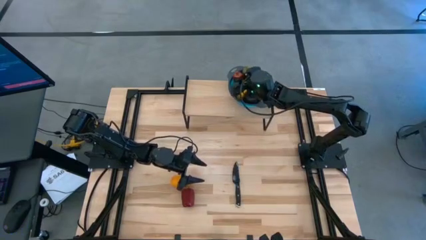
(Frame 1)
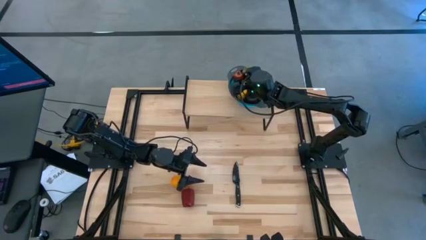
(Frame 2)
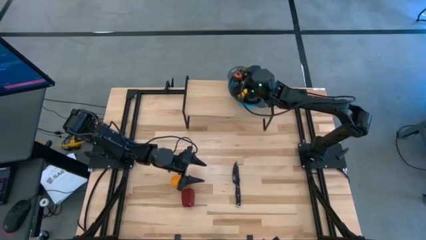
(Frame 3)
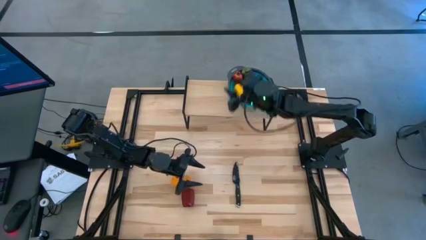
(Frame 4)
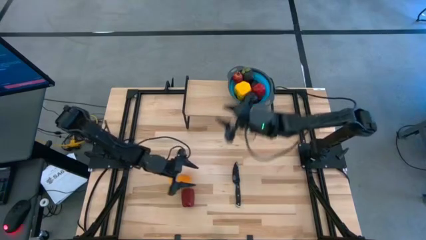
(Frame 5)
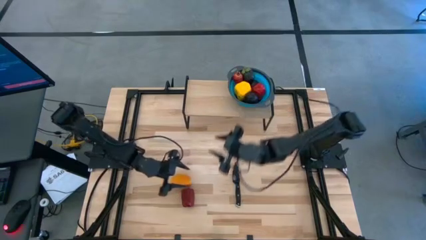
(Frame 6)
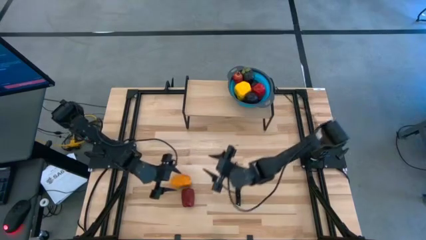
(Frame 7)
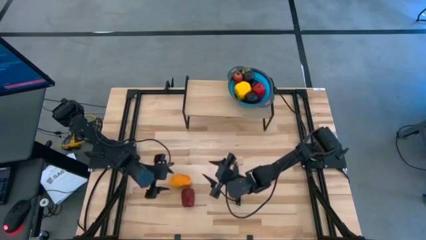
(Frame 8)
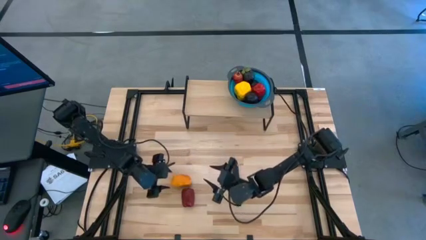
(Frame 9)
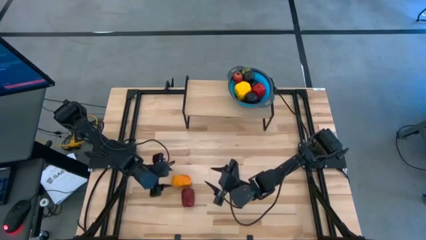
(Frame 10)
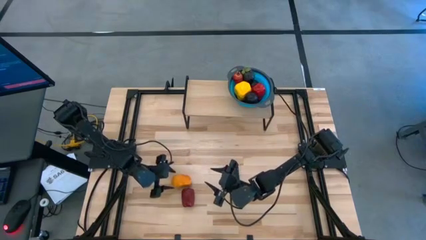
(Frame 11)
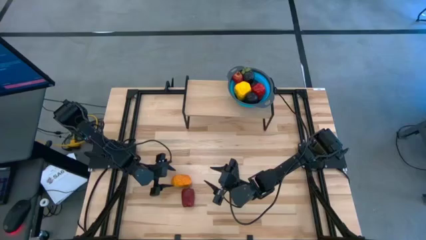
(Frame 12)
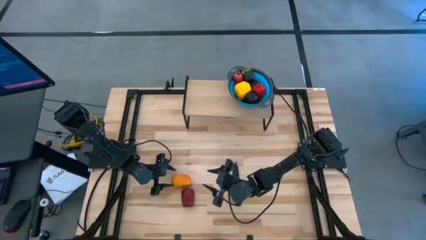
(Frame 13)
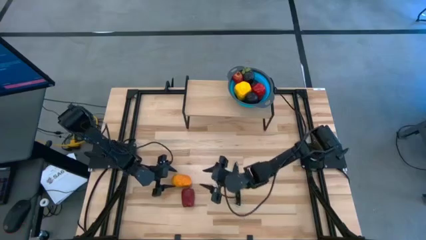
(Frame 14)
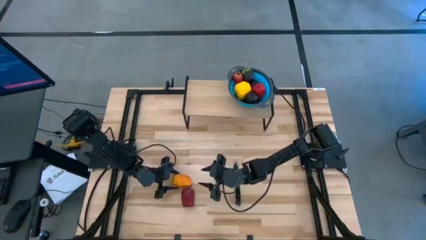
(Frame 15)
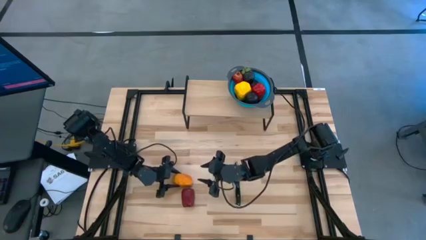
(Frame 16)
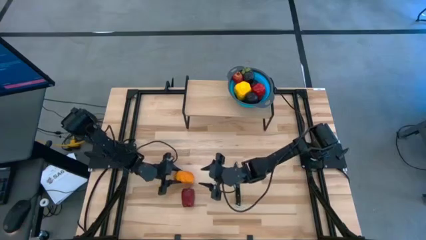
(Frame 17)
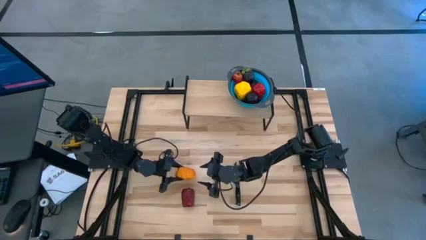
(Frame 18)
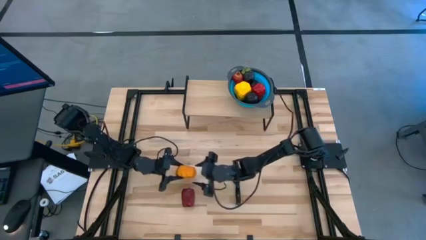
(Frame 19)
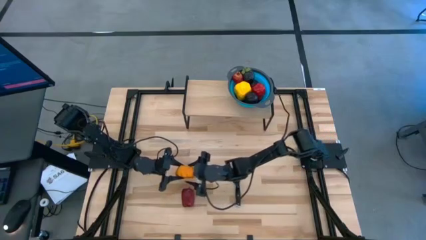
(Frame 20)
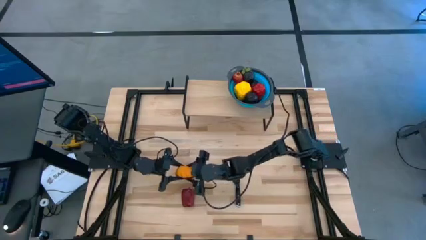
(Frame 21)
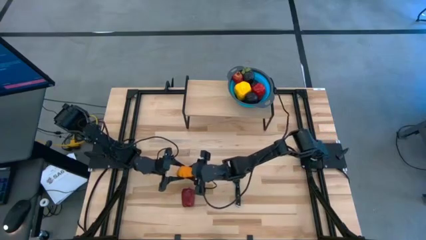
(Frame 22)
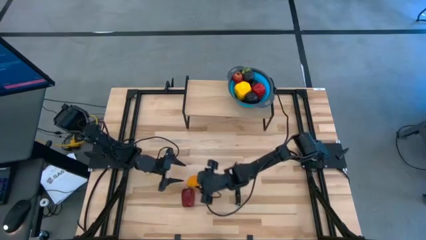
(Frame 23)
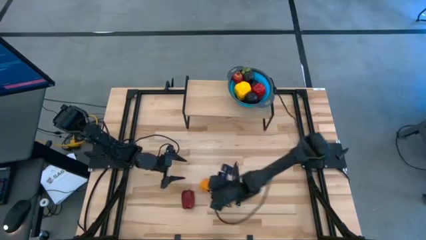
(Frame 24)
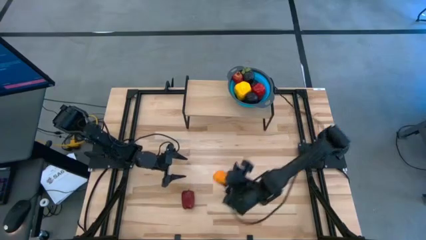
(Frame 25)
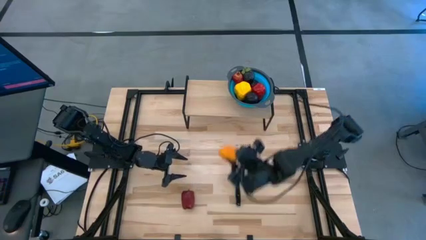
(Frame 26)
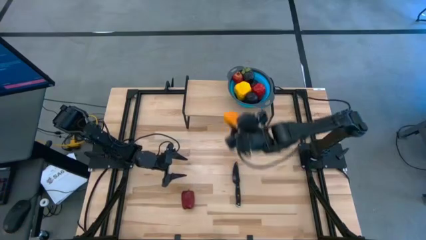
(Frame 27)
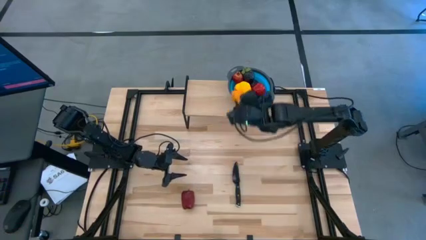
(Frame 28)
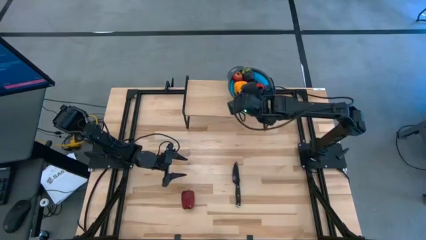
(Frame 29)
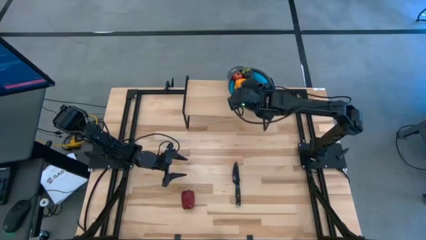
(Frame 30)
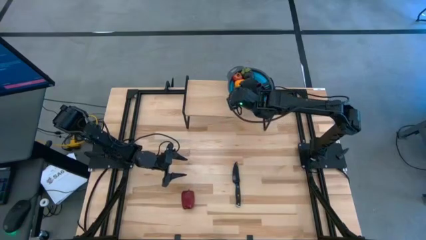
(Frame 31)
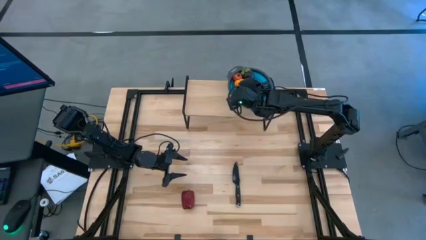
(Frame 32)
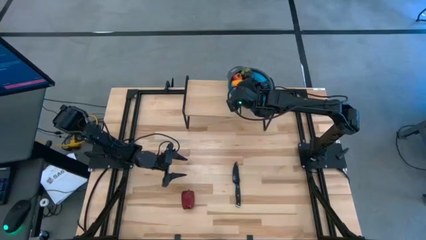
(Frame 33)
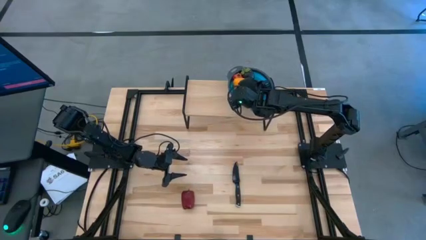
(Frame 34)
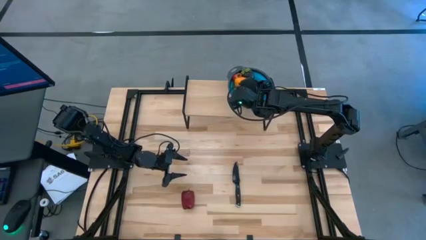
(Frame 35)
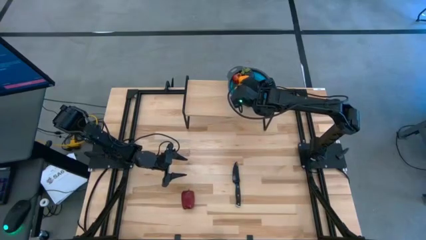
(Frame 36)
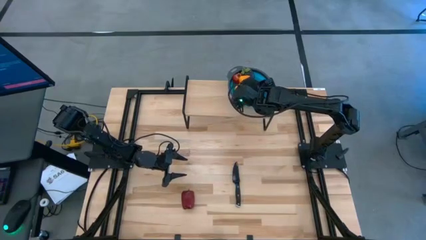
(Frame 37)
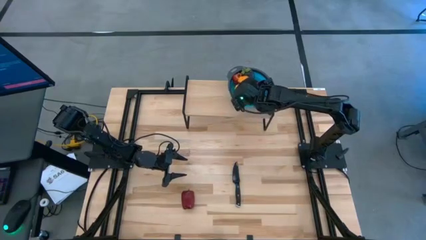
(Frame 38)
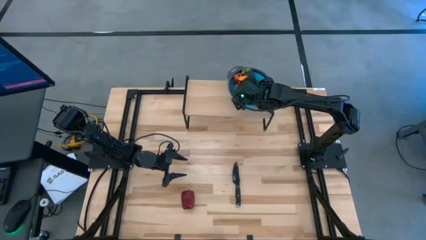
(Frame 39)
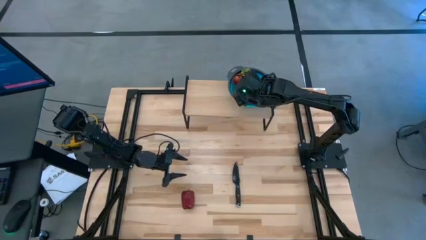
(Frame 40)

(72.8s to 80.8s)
Task: Pick & Place Fruit
Put the yellow mango into the blue strainer bowl on the shelf

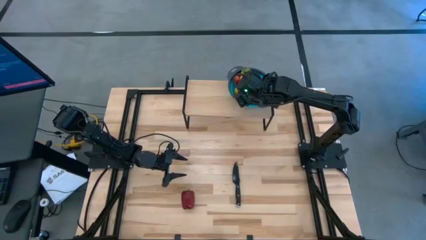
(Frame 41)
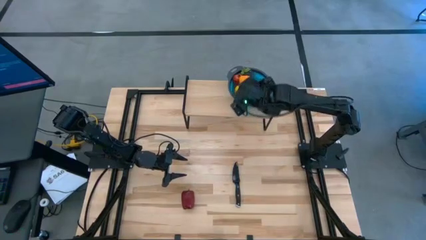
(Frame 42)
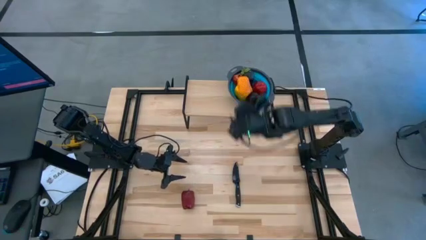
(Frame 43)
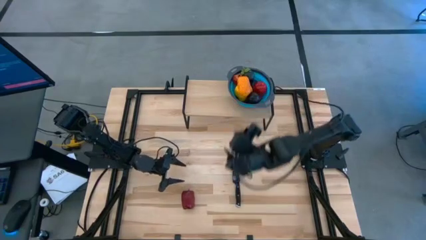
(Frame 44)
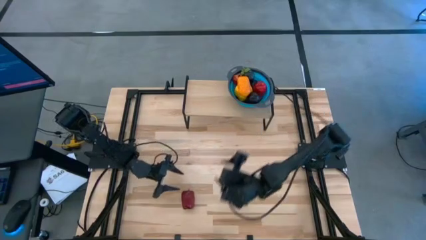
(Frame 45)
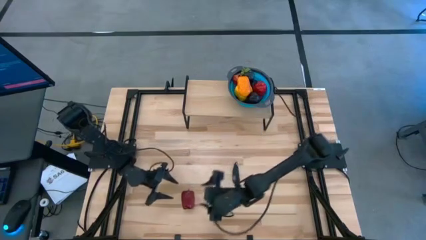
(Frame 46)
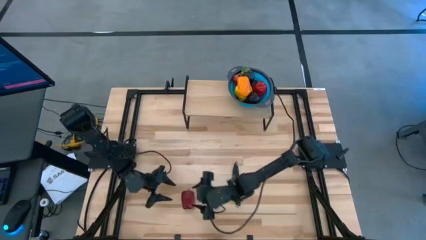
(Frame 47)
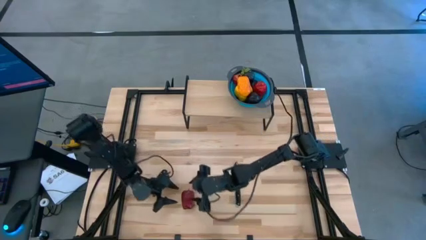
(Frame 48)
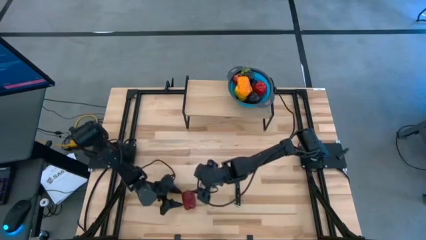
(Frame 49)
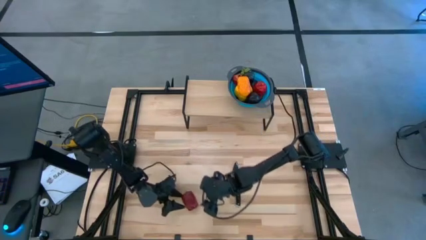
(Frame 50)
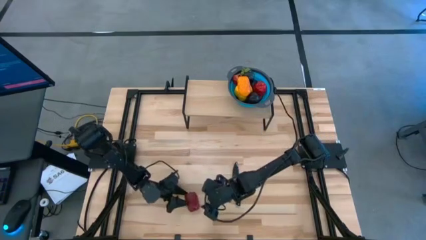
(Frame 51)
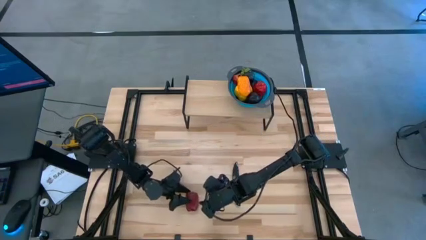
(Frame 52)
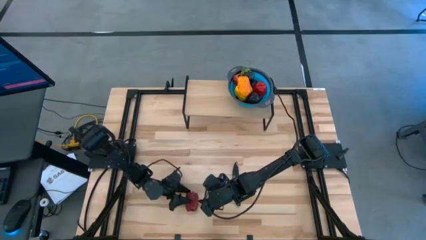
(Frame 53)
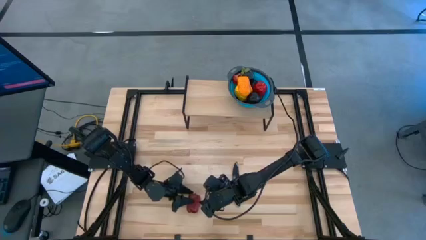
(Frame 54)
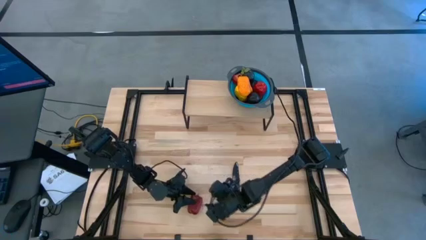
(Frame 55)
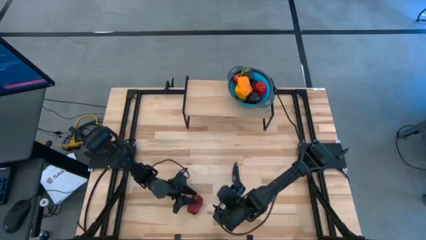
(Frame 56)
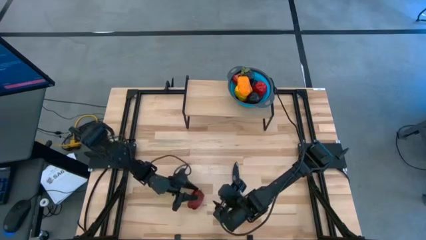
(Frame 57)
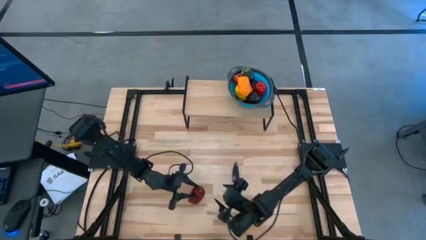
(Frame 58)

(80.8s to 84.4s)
Put the apple into the blue strainer bowl on the shelf

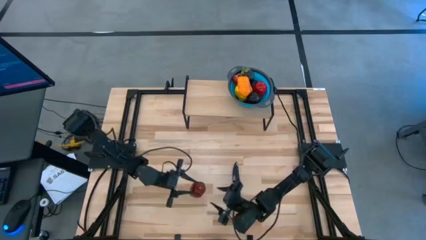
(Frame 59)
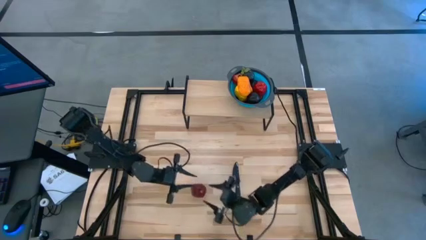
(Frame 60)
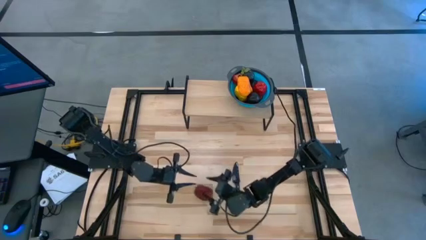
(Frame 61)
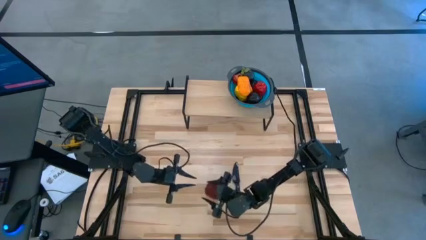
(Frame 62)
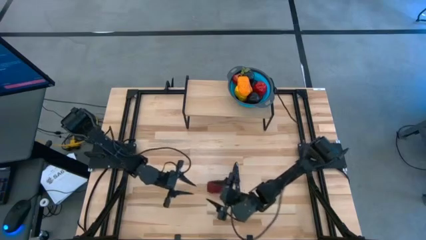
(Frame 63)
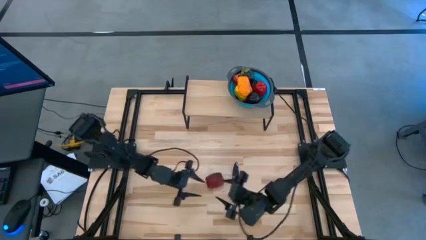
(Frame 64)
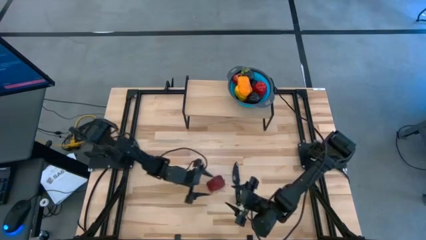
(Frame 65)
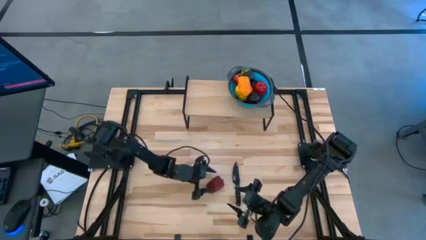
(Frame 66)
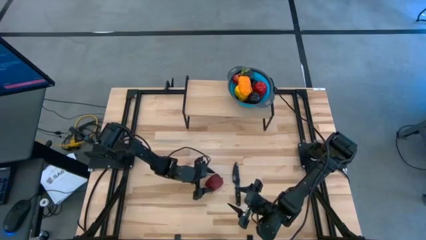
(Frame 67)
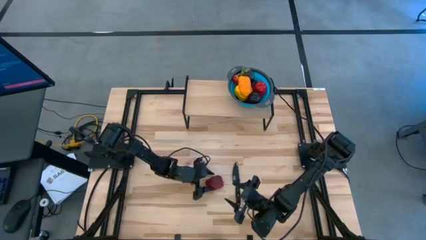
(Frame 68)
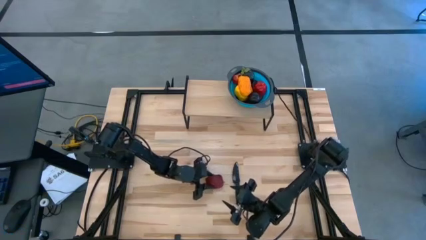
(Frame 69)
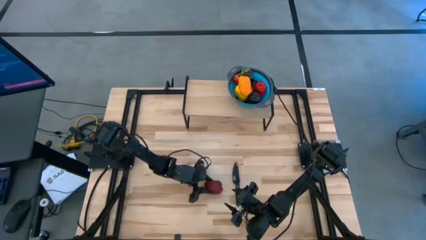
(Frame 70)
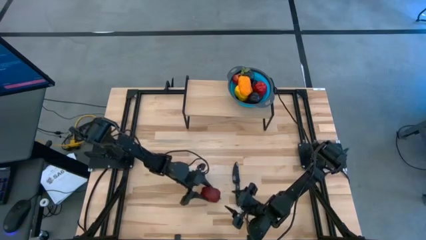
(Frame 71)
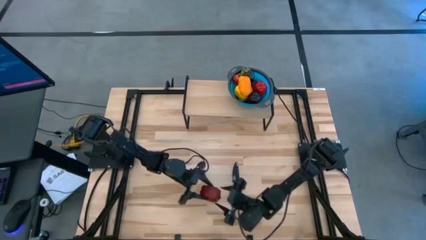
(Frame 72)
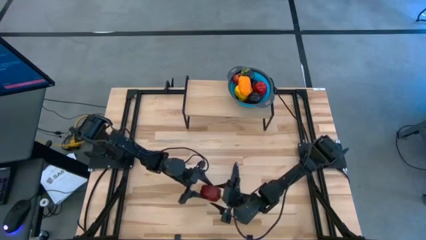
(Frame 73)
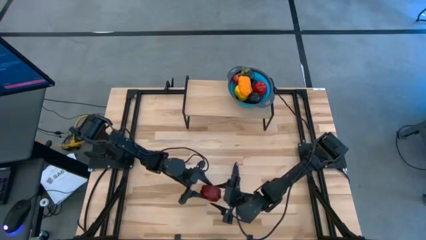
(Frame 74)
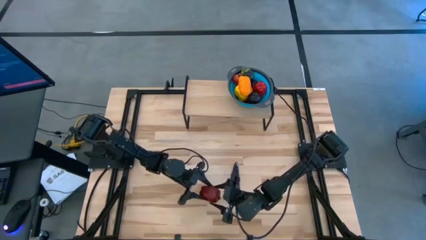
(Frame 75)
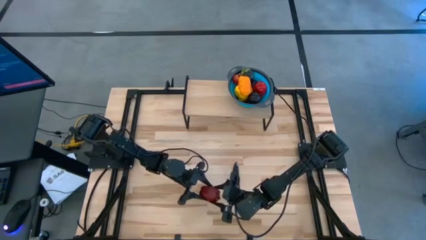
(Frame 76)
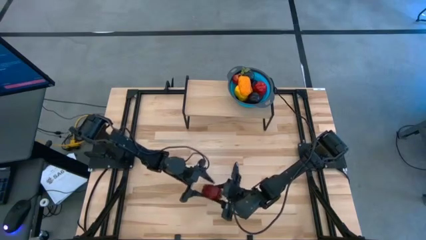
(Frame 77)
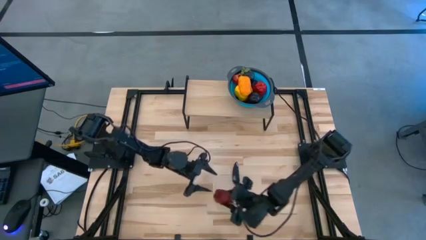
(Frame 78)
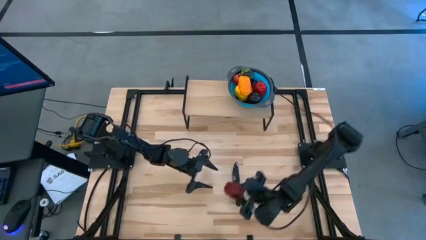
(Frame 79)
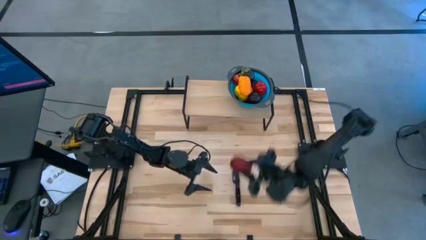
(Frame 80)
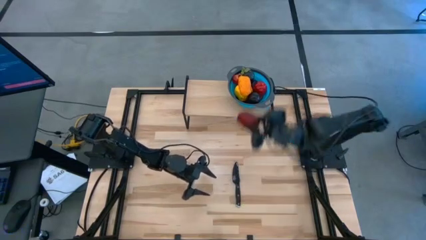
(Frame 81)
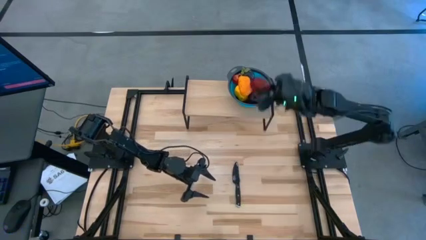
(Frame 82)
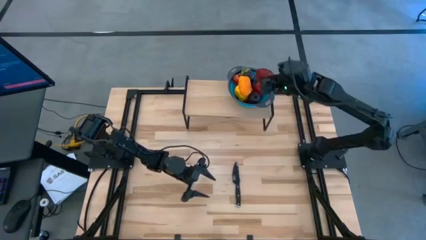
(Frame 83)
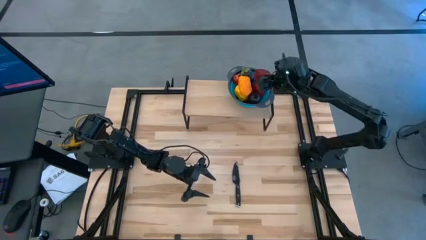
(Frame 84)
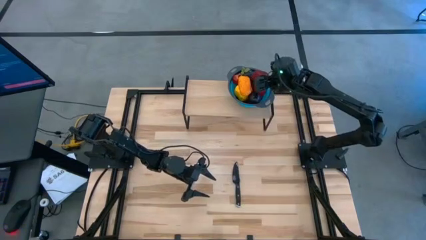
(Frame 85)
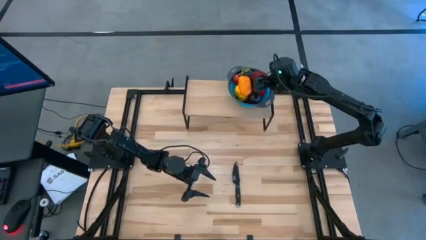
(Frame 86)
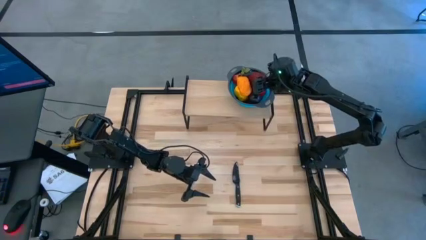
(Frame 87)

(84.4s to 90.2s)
Put the red apple into the blue strainer bowl on the shelf
